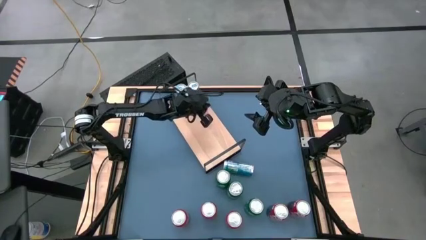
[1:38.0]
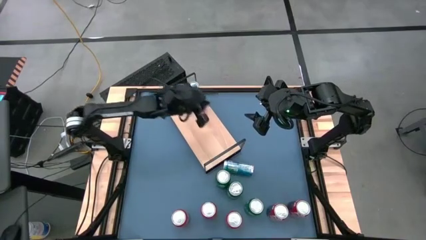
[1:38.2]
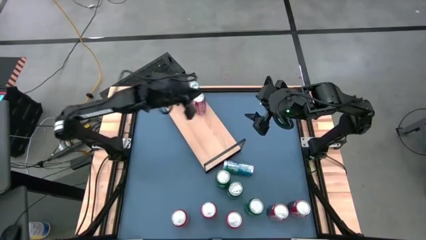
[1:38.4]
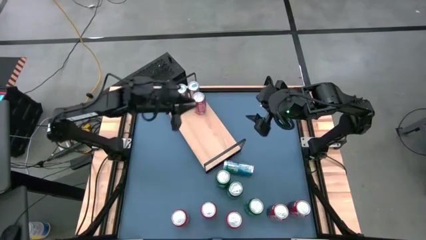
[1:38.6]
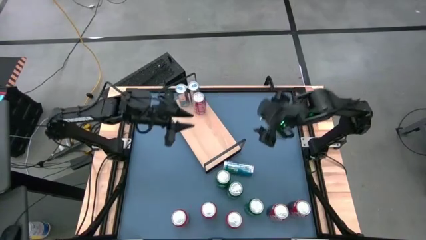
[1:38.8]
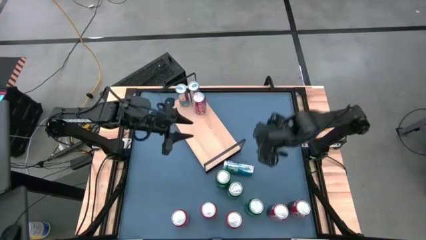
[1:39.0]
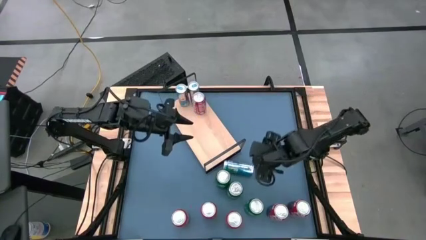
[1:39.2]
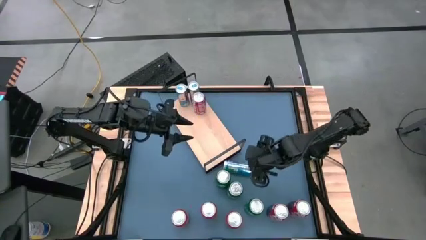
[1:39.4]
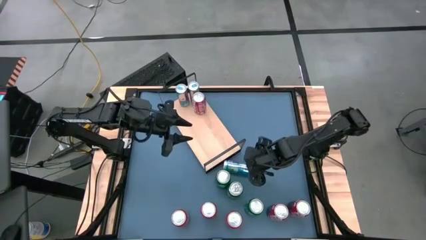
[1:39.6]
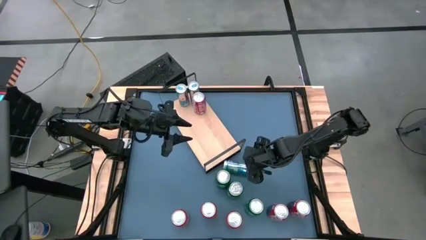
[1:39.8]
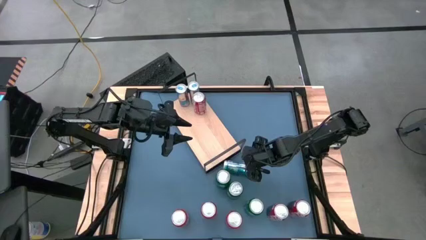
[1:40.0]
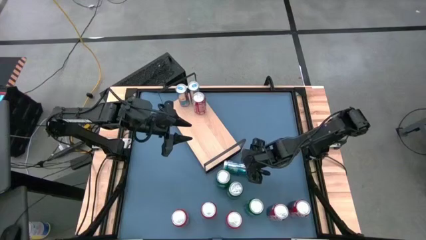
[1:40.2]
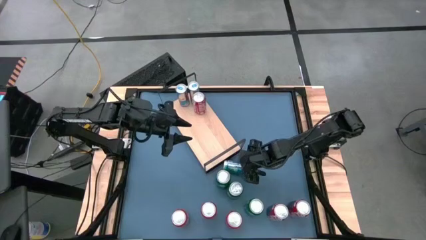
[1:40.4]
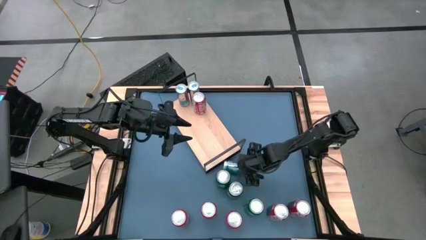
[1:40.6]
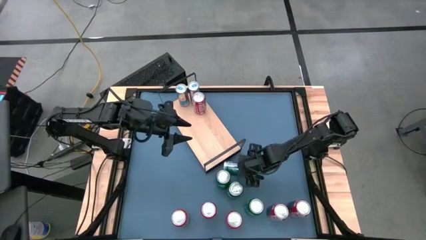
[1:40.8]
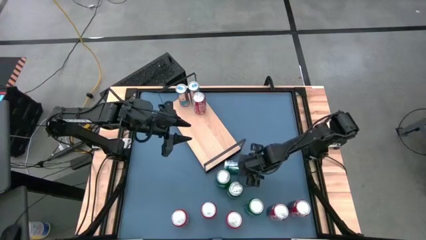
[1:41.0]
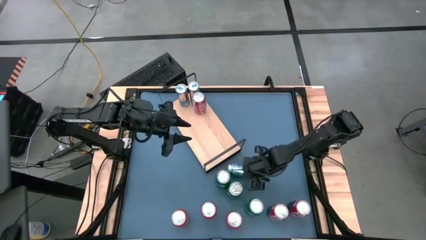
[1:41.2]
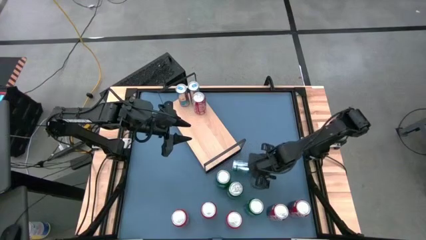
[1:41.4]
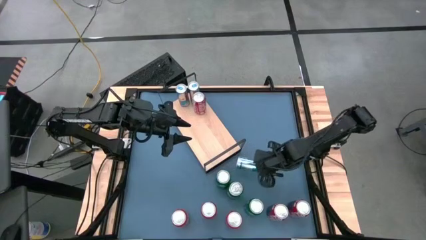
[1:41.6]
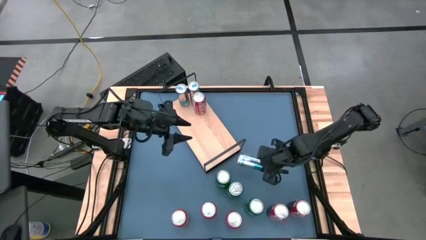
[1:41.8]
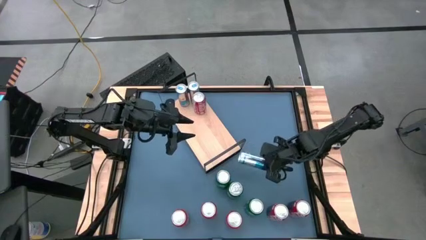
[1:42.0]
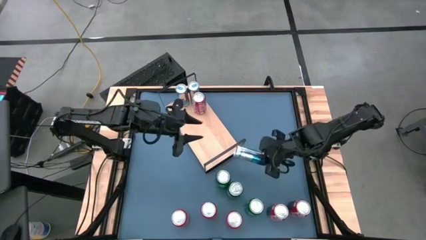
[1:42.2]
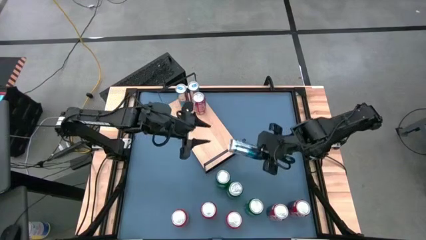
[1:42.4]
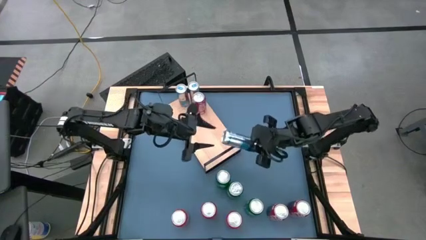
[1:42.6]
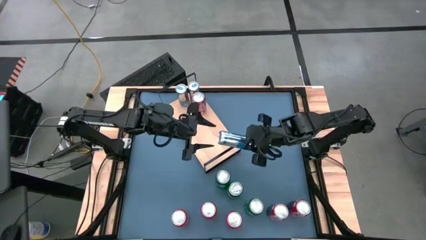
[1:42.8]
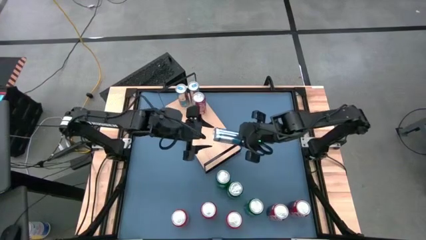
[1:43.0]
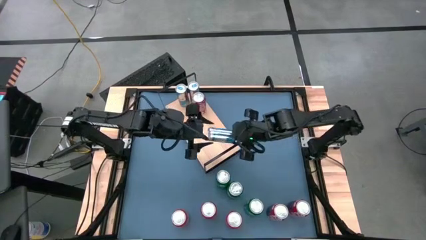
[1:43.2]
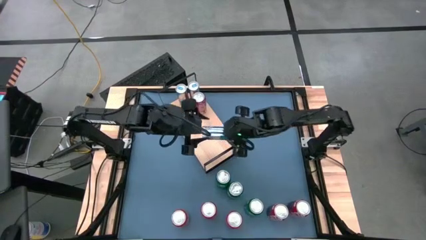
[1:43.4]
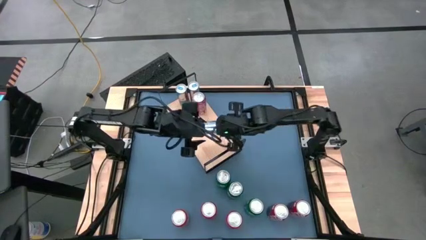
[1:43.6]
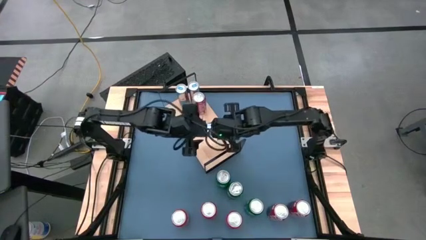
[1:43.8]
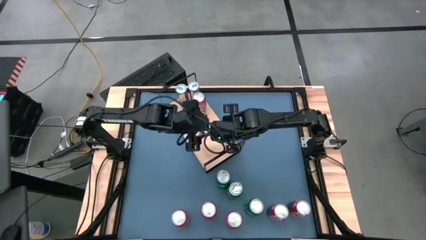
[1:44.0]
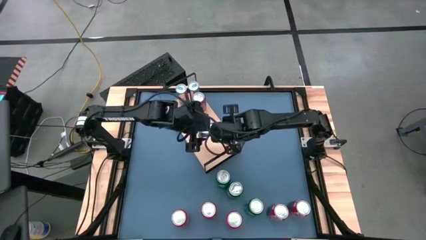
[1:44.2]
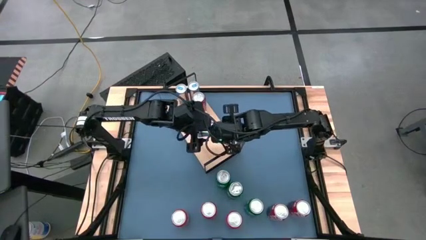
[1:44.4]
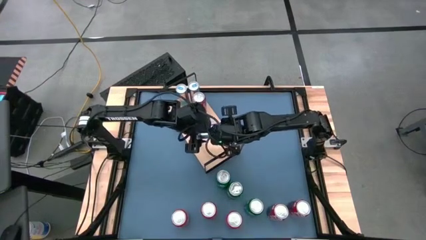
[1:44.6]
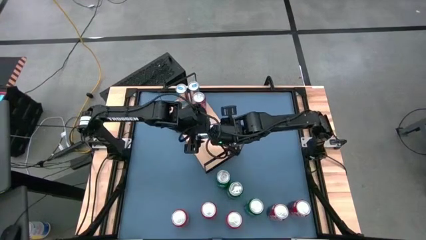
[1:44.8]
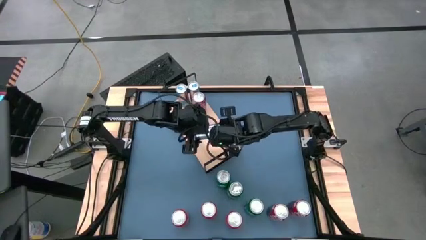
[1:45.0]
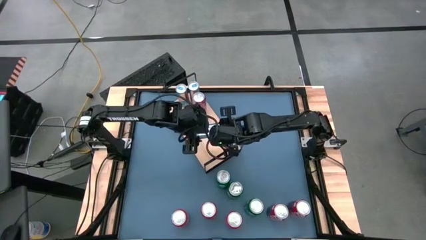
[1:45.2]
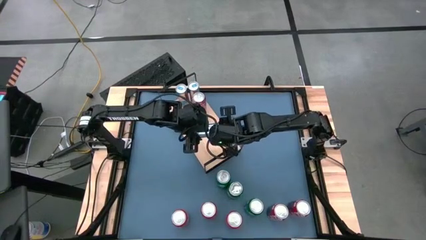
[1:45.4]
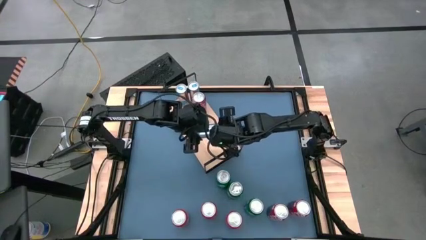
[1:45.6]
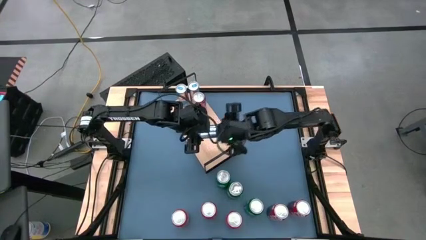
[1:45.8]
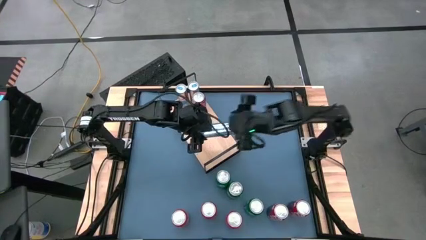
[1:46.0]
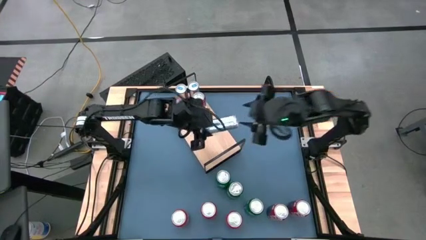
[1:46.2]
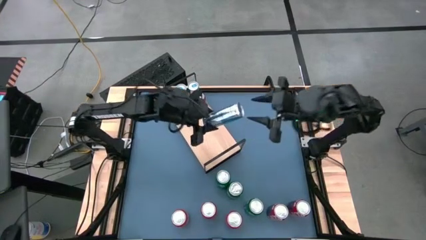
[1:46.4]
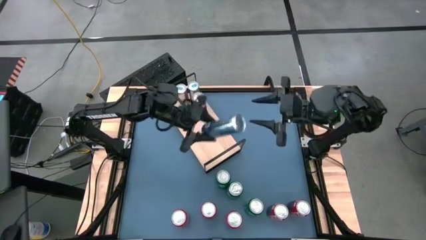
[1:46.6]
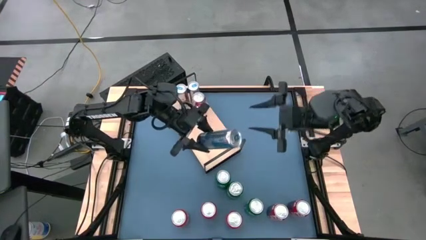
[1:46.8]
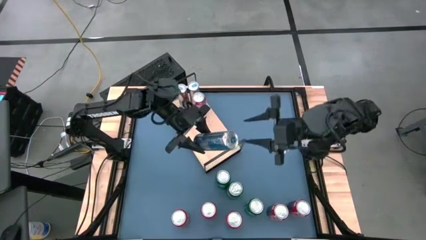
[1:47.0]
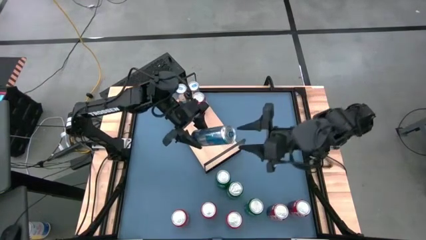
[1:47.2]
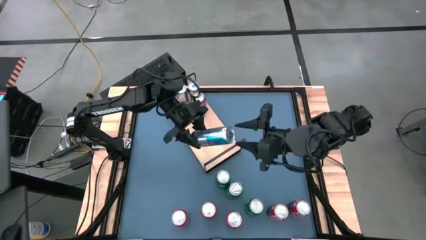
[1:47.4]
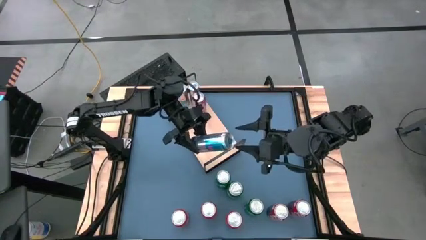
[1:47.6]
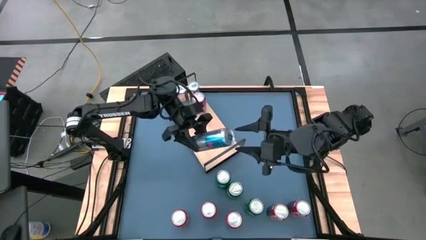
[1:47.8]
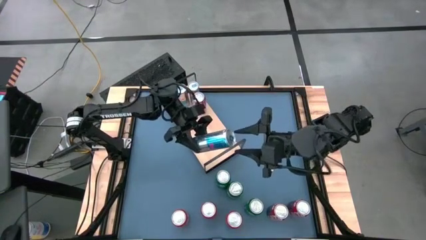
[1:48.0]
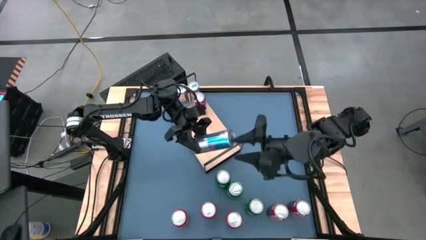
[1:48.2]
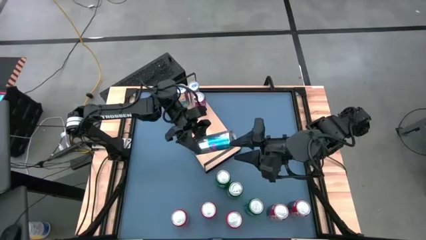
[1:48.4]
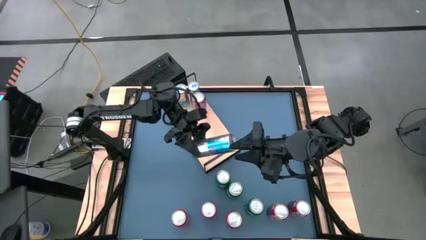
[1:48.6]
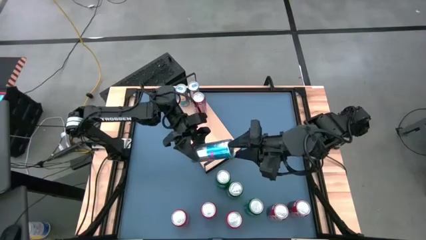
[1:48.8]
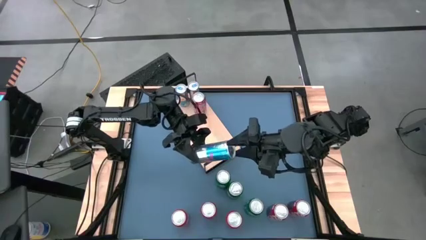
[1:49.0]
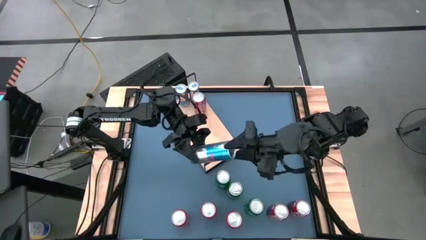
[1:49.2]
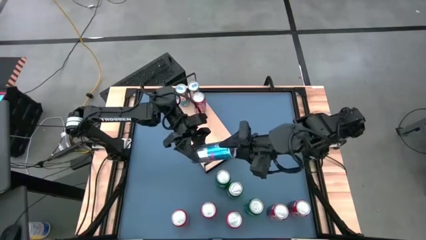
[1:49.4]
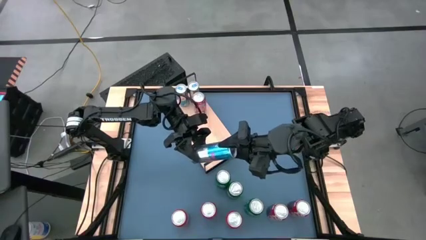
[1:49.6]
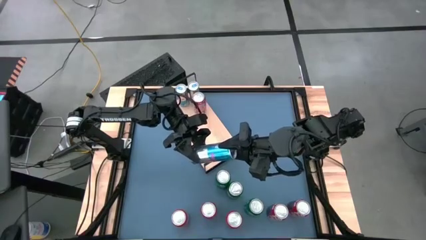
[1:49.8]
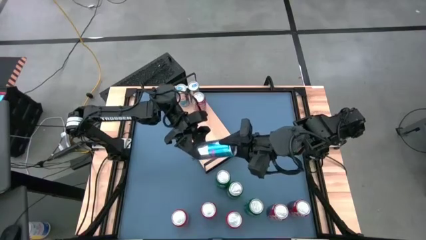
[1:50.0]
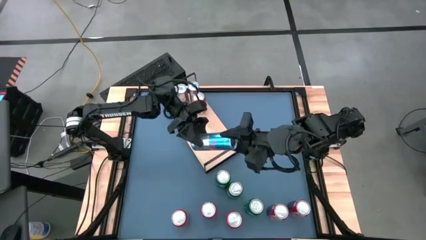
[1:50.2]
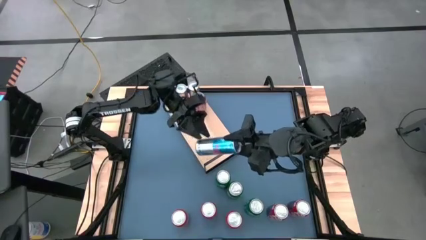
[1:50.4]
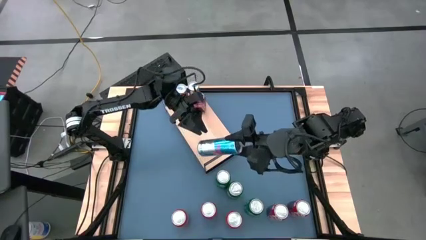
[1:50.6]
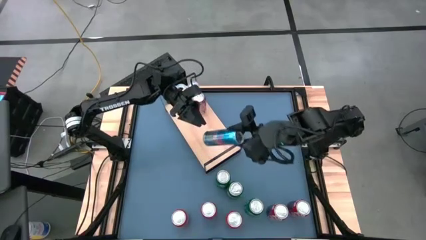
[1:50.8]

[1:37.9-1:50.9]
Task: Place canned beverage on shelf
Put the blue soda can on the shelf aligned with the other blue soda cans

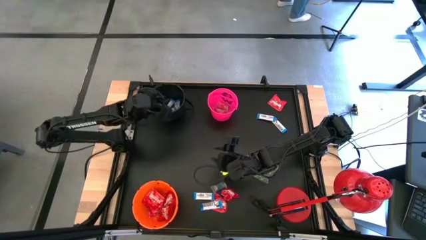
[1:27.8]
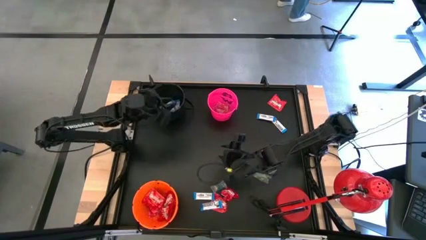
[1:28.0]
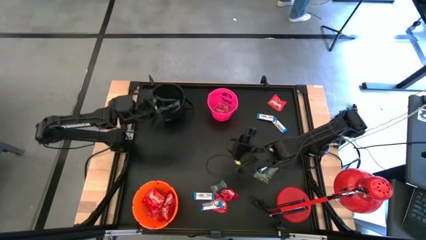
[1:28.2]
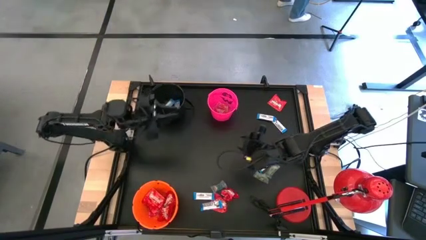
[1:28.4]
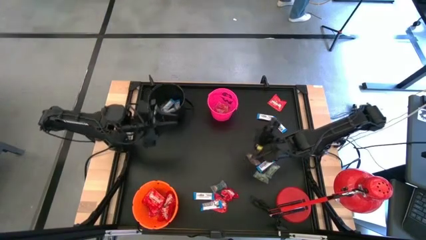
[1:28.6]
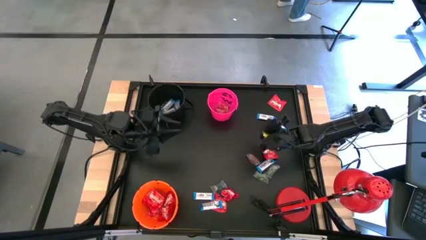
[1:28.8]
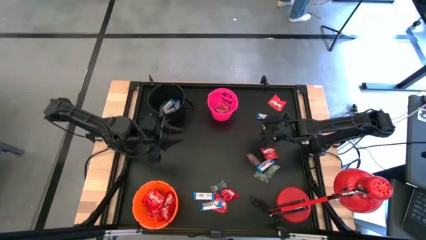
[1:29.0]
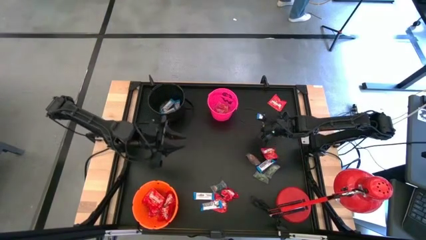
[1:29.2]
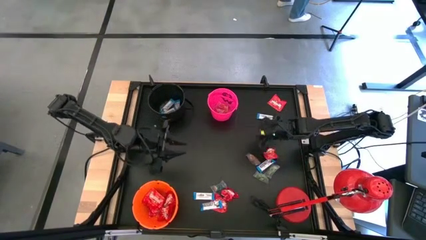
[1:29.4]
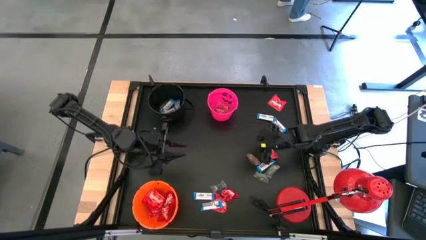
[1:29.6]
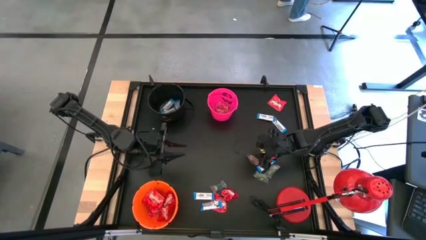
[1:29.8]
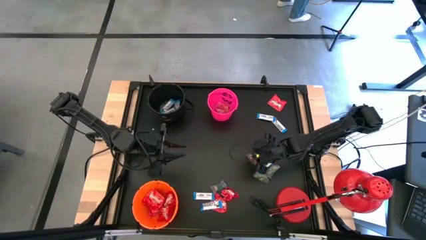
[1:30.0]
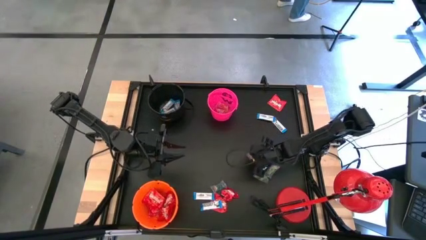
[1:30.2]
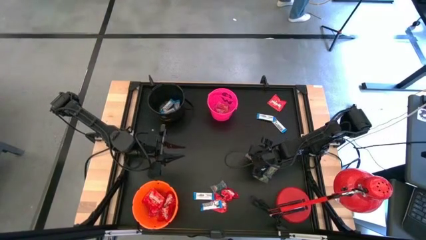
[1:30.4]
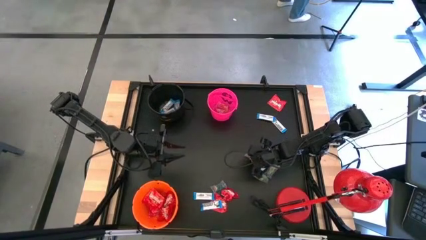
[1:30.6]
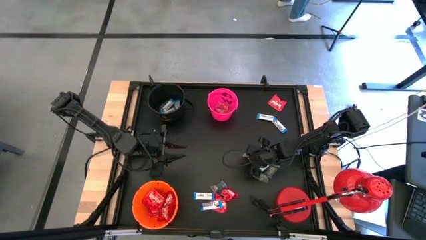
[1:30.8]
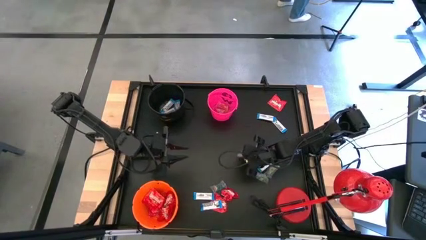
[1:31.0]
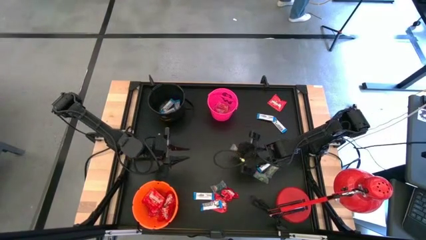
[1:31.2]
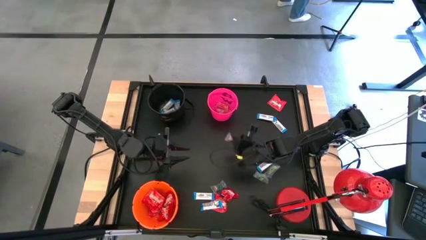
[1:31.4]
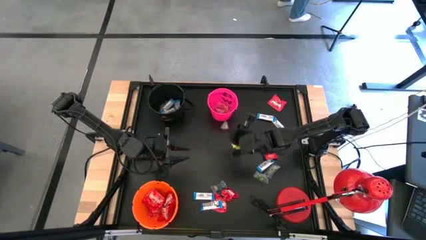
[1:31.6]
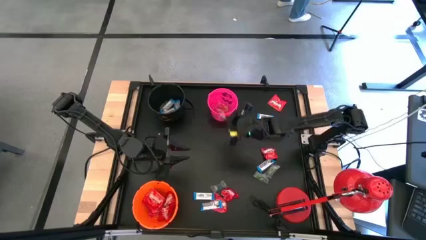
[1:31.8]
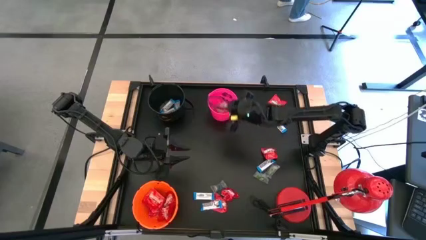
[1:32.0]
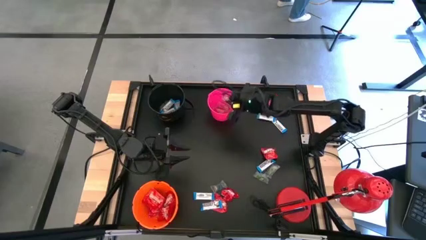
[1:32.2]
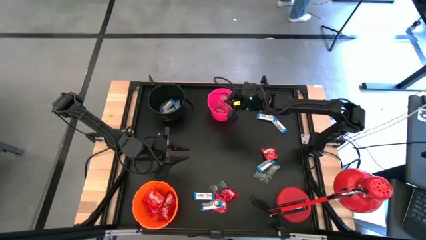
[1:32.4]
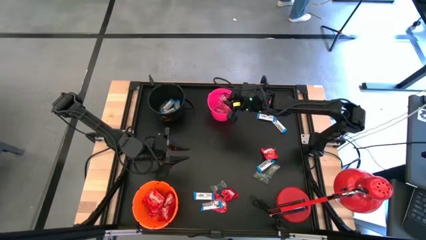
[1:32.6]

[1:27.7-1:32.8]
Task: Organize candy in baskets
Put the orange gummy into the pink bucket
